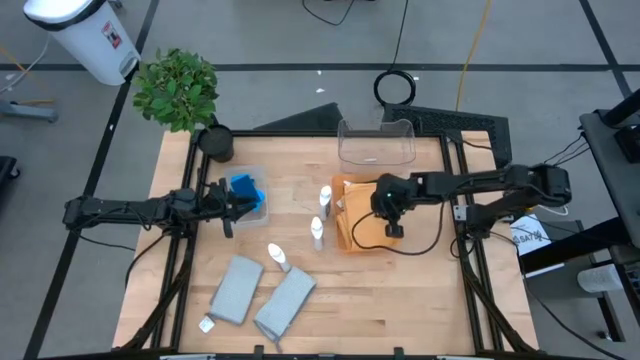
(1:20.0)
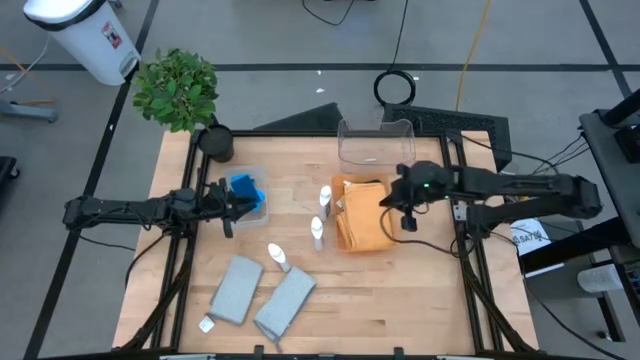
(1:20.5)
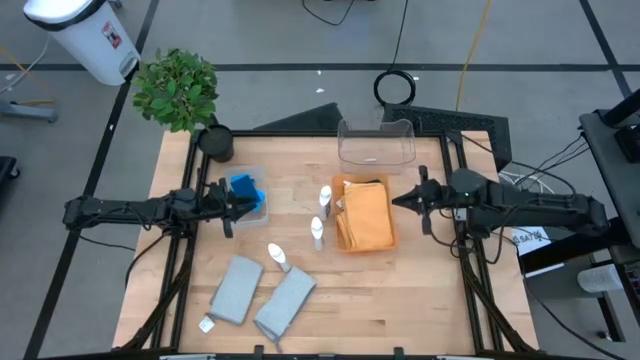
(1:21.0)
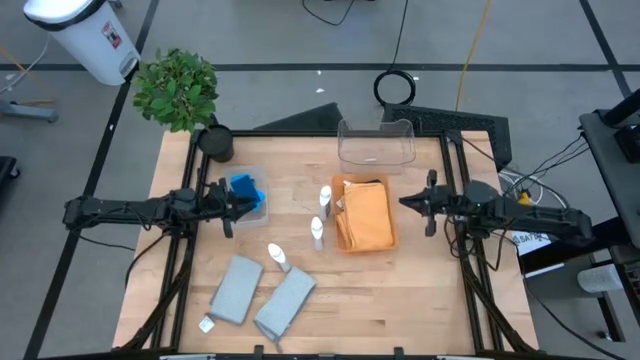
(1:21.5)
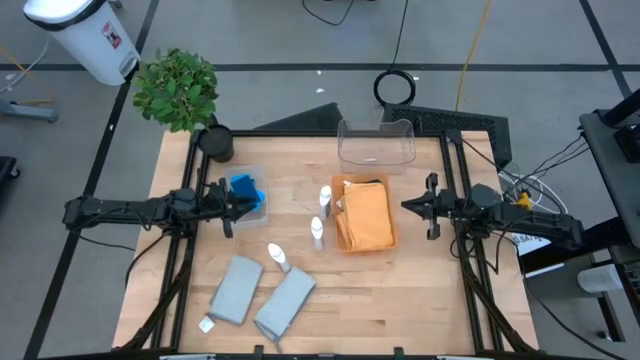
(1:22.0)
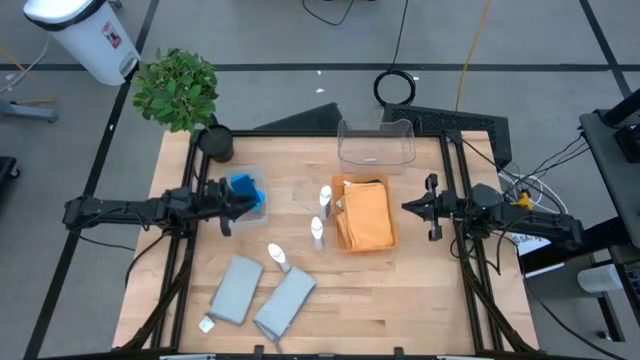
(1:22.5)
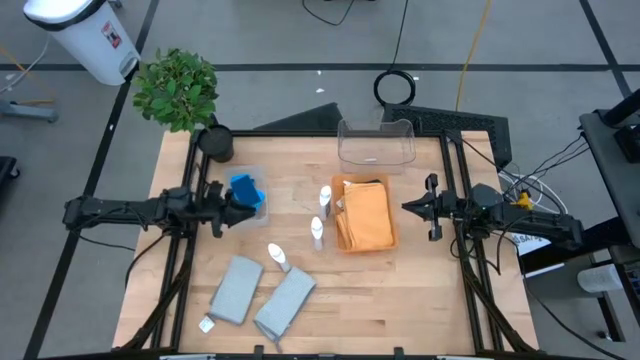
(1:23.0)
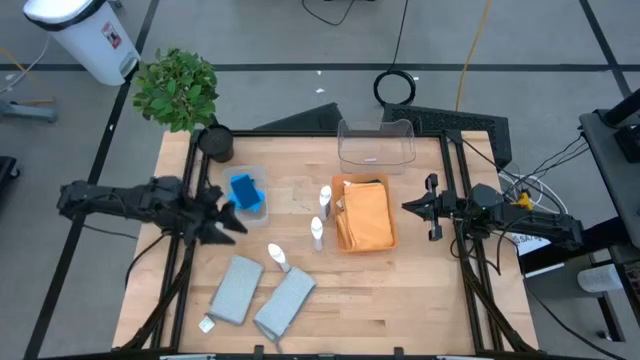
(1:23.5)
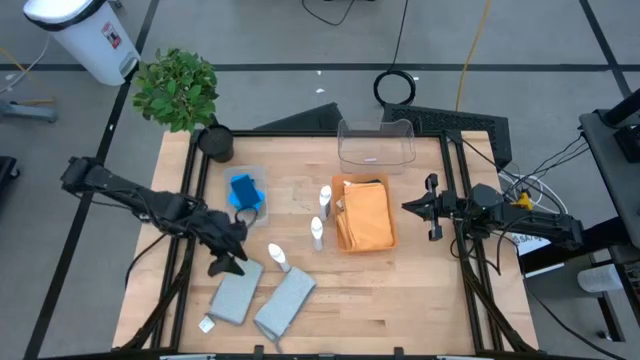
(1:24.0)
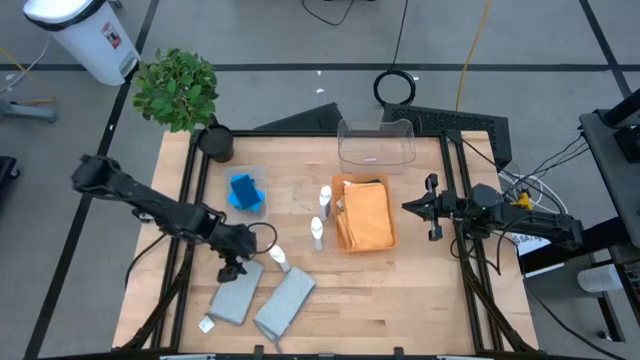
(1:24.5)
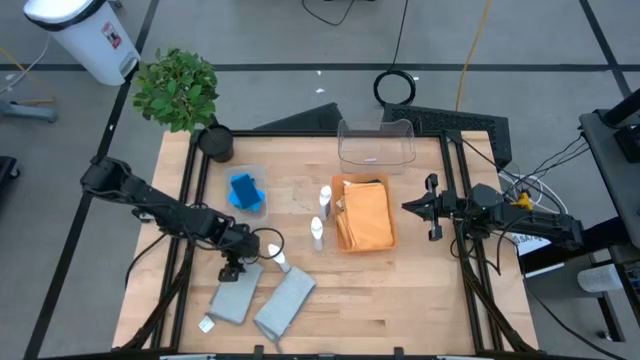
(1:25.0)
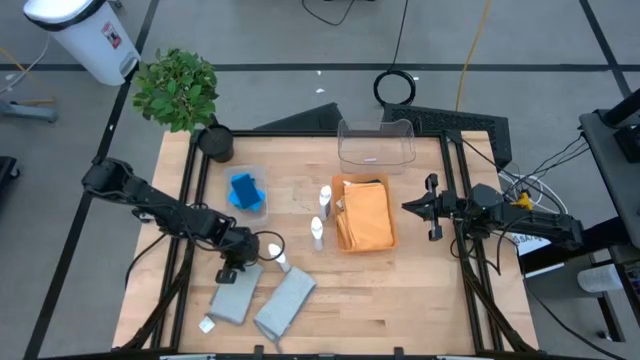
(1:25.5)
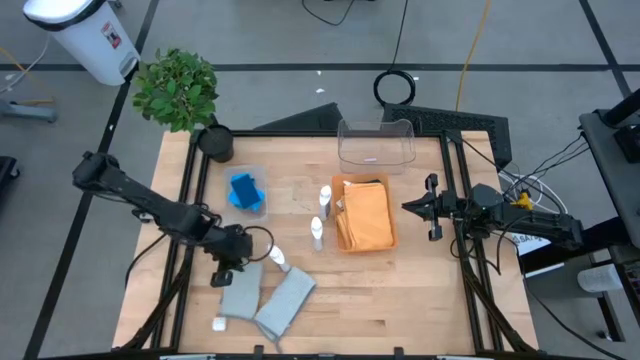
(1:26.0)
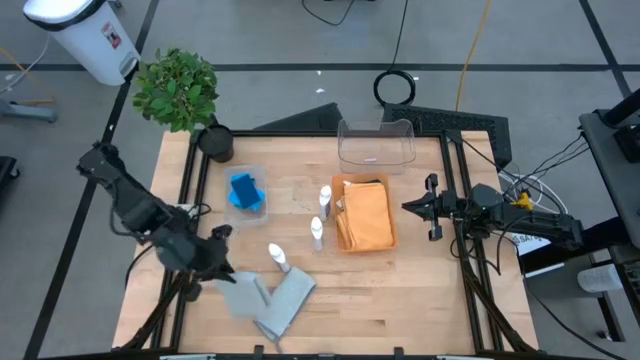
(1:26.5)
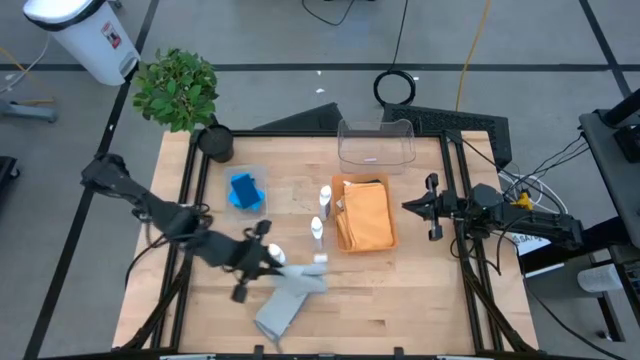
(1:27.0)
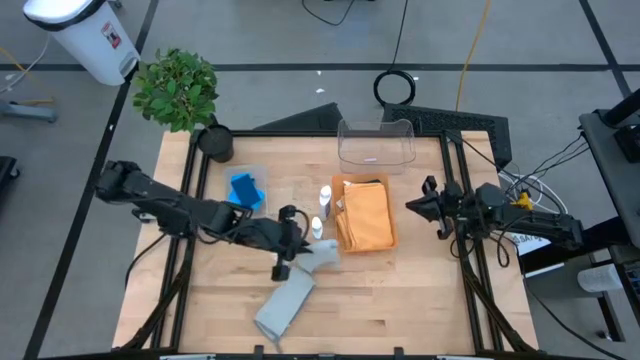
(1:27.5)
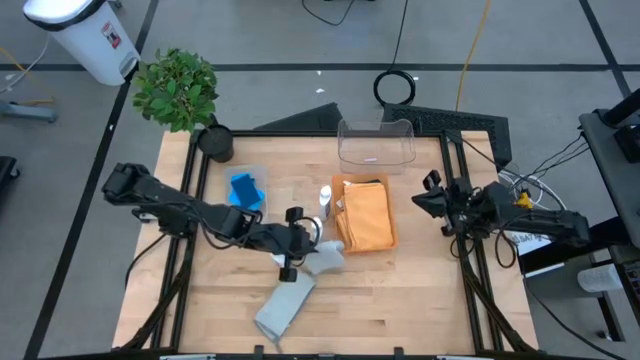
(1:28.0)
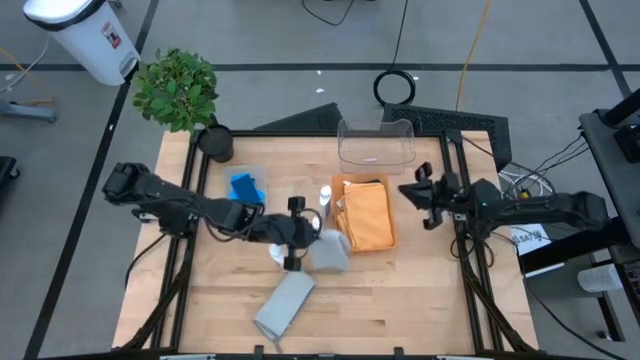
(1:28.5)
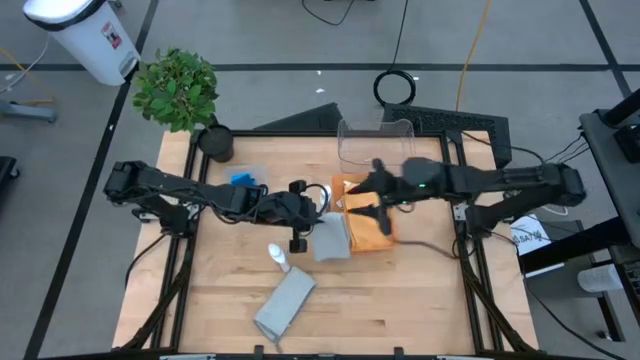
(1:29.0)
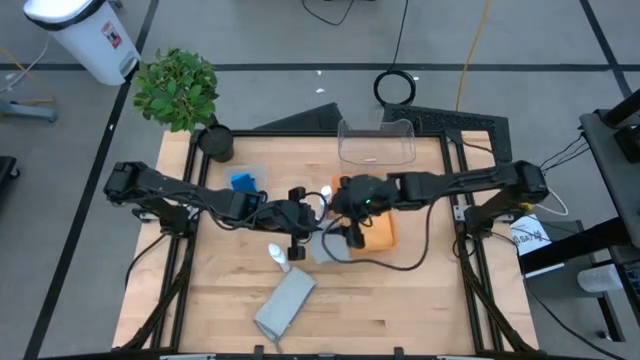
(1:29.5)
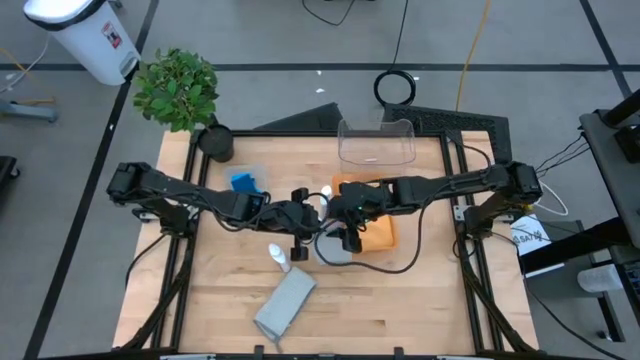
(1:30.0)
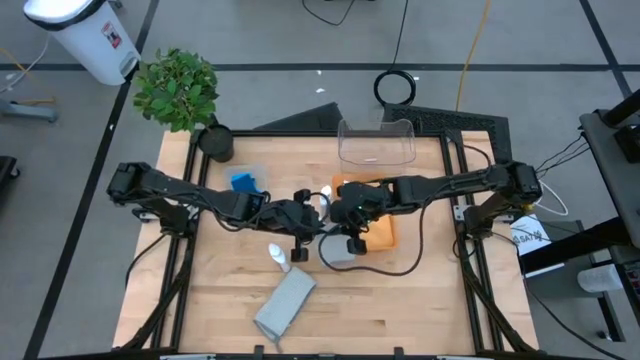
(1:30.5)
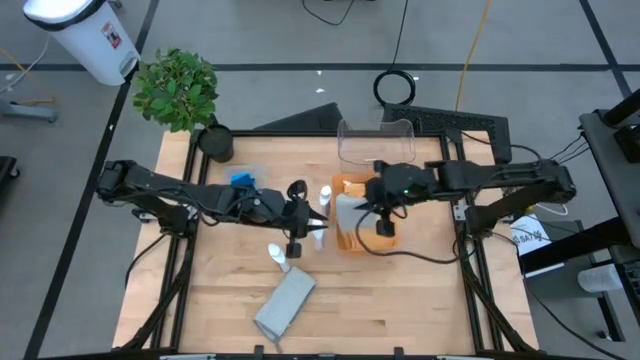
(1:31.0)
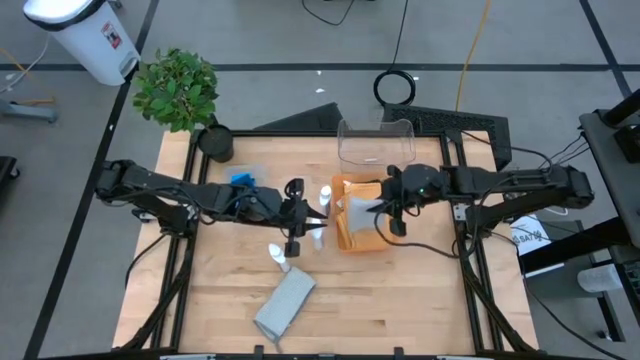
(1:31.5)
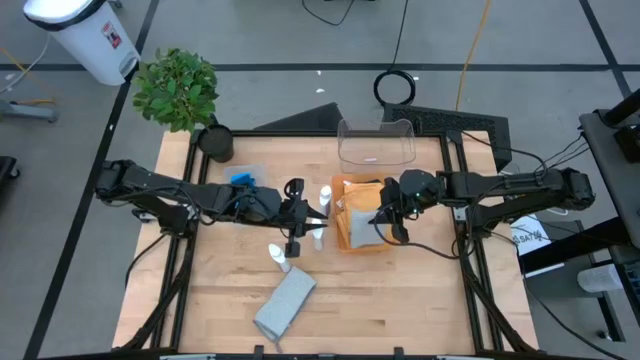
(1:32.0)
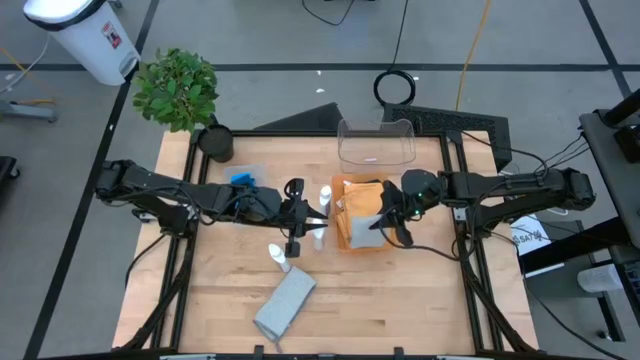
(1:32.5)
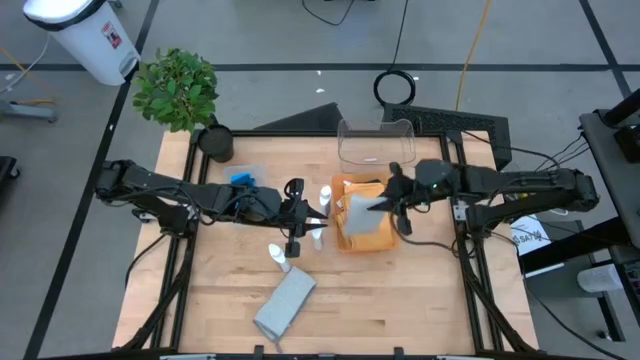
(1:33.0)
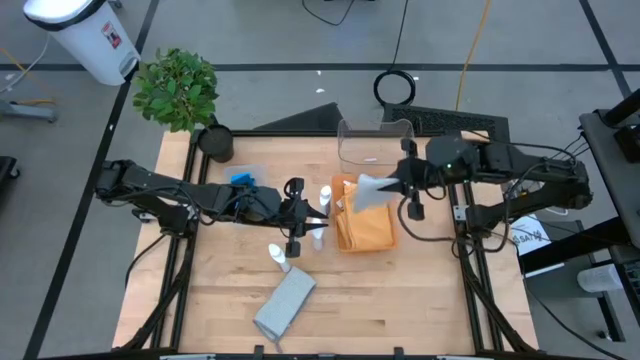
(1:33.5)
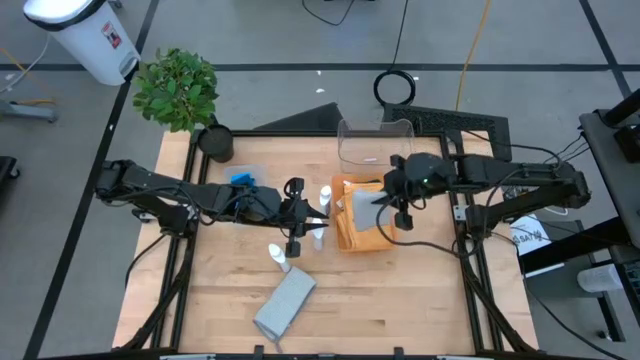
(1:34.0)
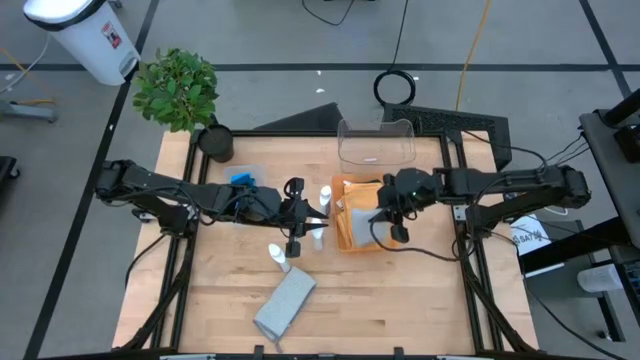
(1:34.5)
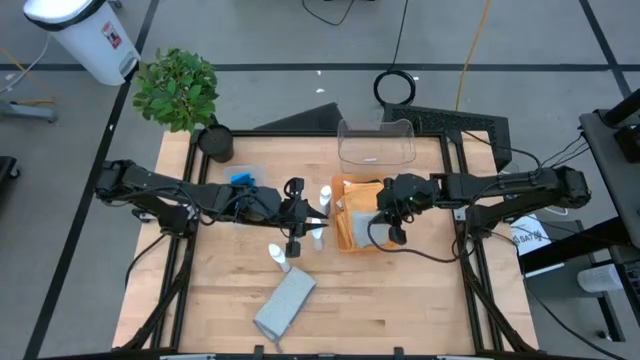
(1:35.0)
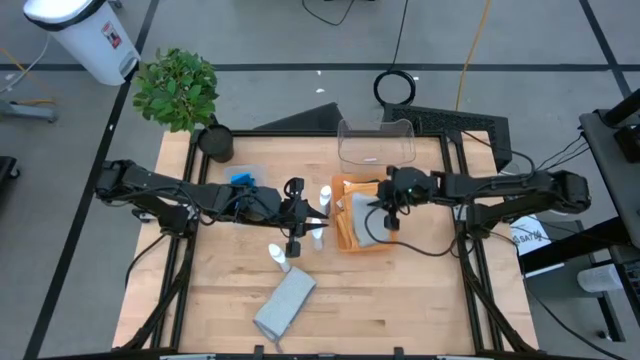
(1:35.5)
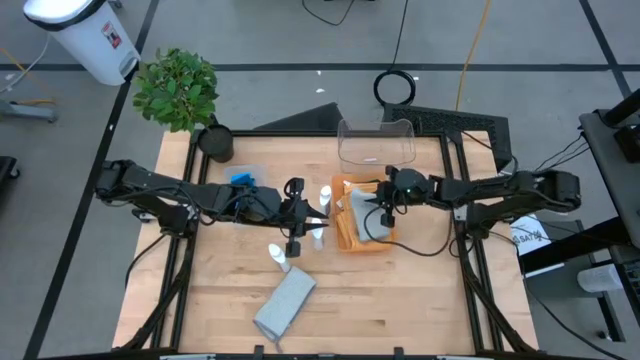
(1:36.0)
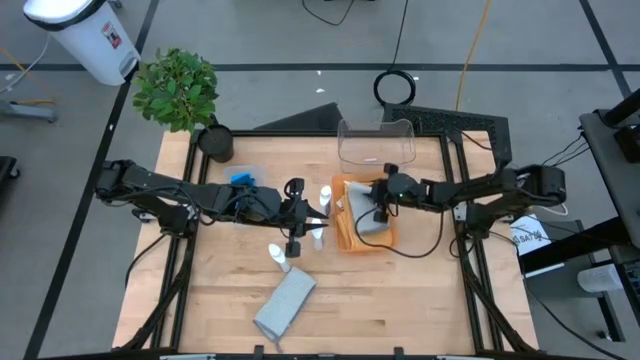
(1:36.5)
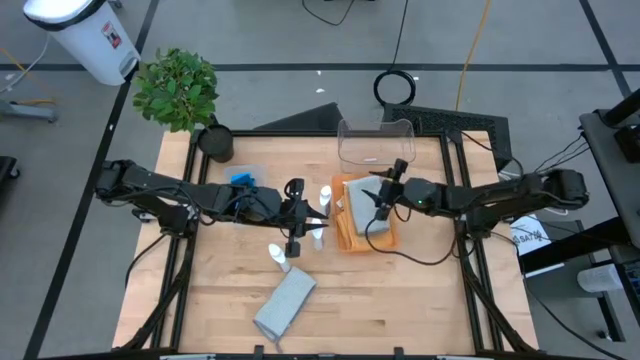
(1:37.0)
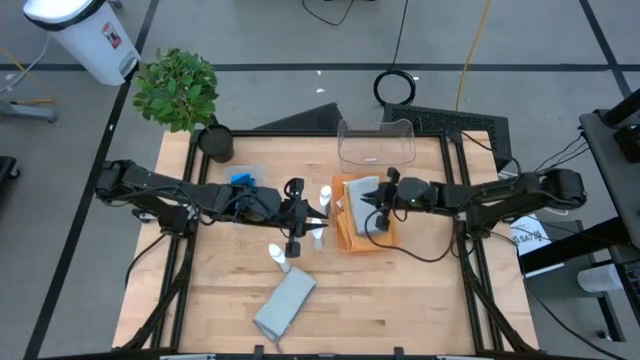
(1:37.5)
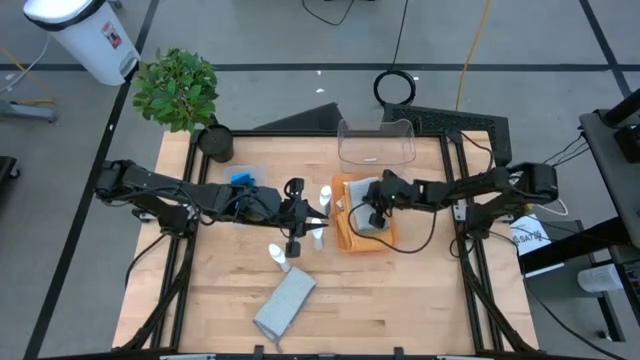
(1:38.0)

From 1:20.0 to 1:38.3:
Task: Pick & Place Kitchen Items
Put the gray microfiber cloth into the orange bin

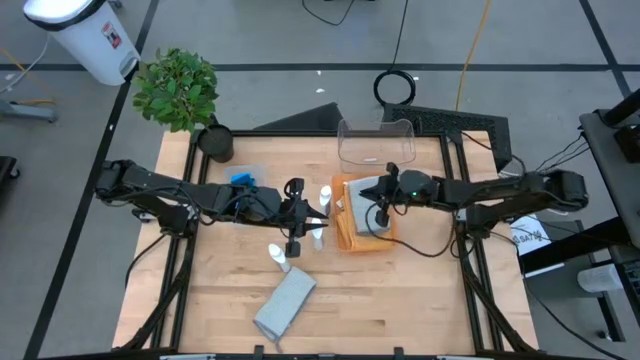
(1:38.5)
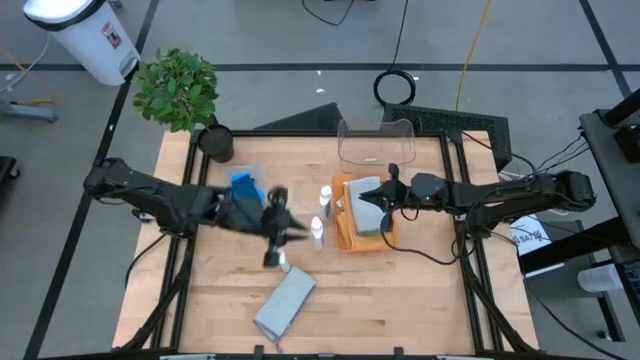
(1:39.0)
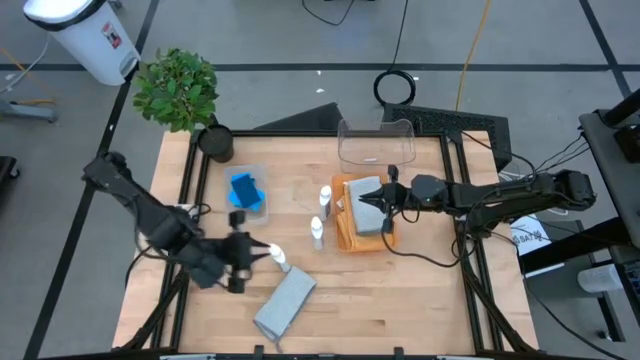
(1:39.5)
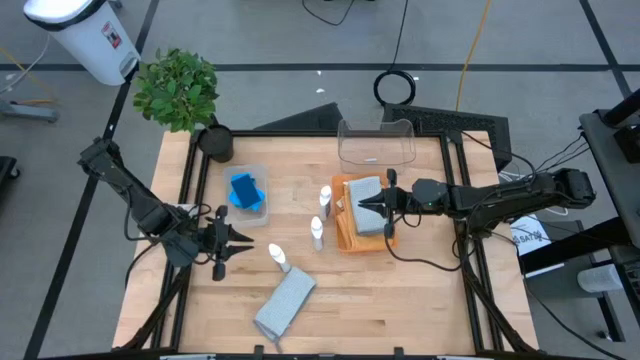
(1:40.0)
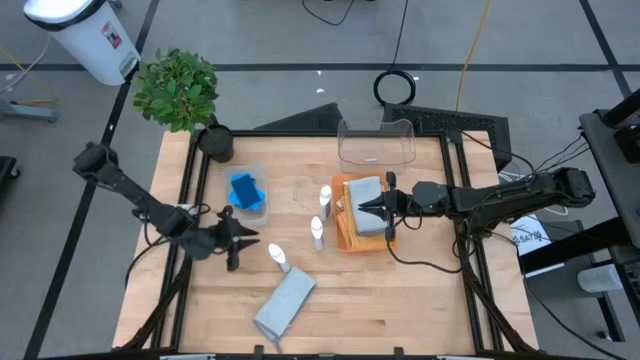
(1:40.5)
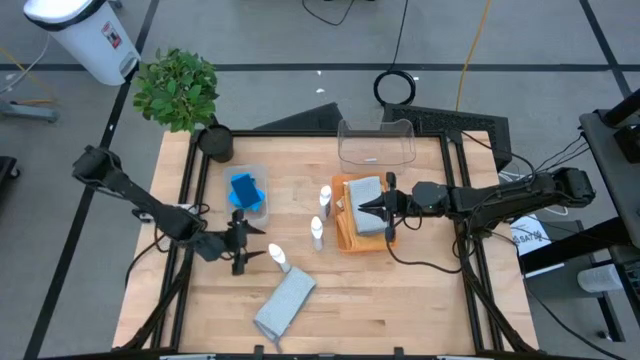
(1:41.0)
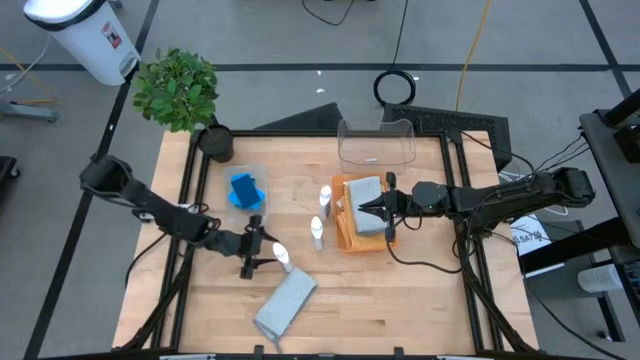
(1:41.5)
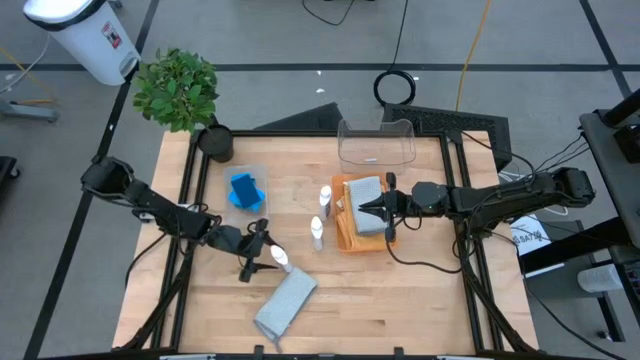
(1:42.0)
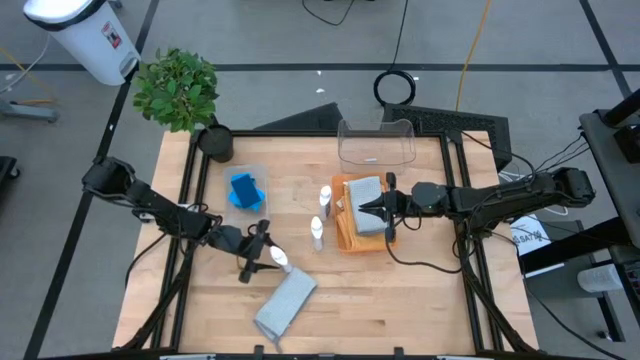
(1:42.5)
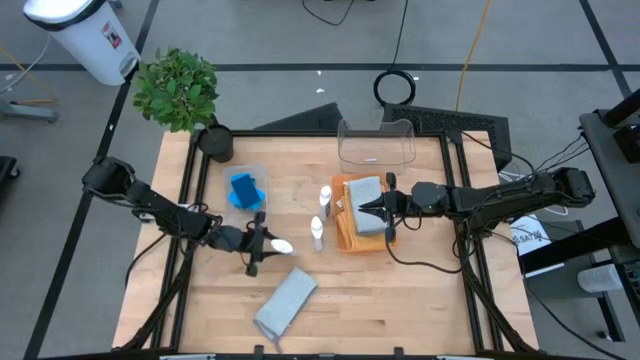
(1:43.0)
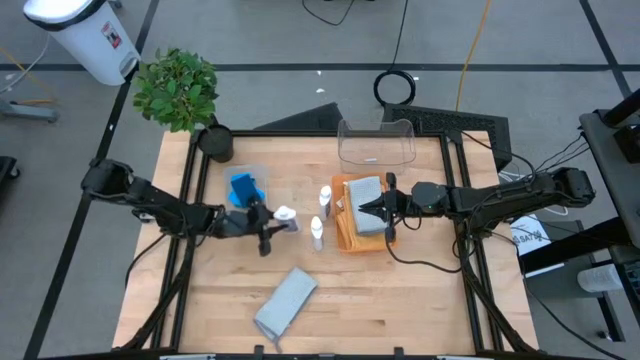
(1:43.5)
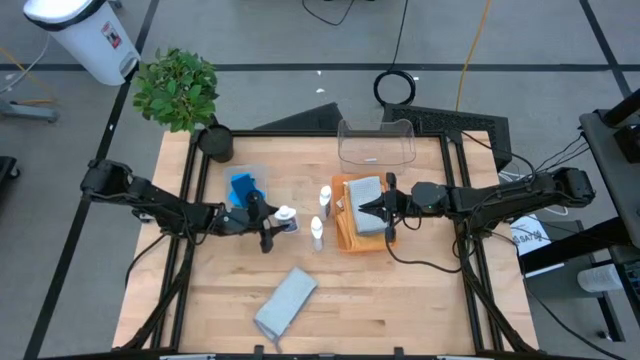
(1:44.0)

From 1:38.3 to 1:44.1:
Adjust the white plastic restorer bottle
